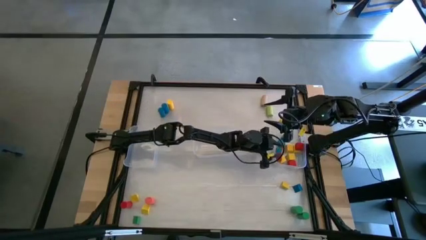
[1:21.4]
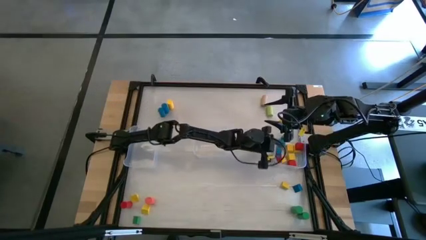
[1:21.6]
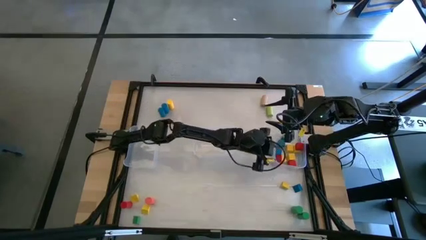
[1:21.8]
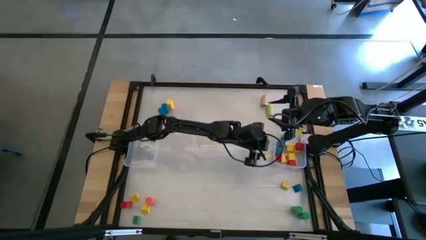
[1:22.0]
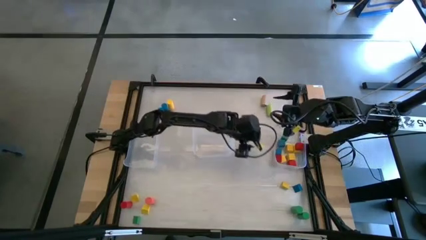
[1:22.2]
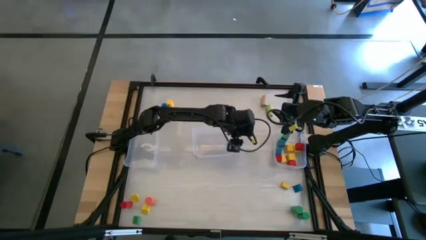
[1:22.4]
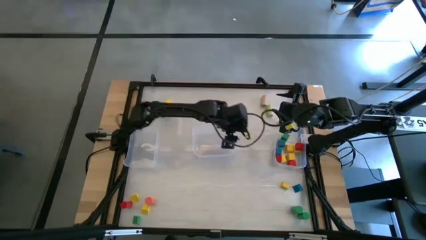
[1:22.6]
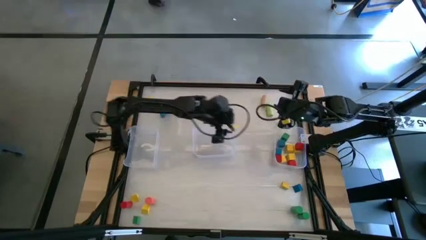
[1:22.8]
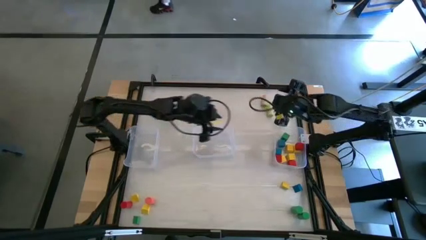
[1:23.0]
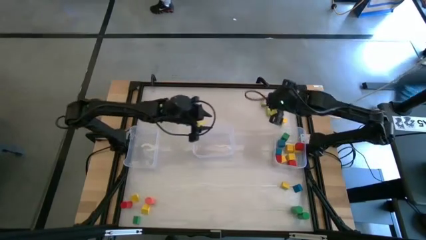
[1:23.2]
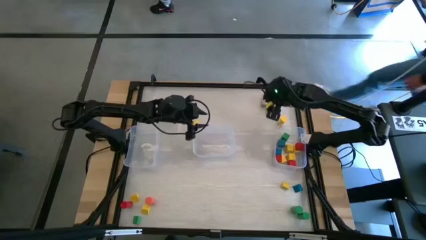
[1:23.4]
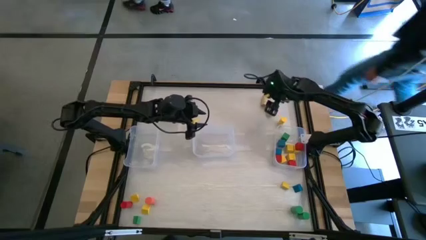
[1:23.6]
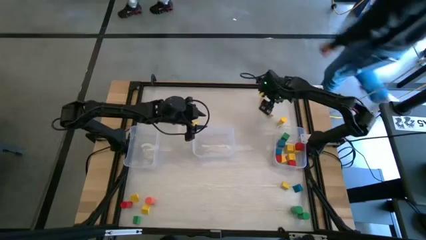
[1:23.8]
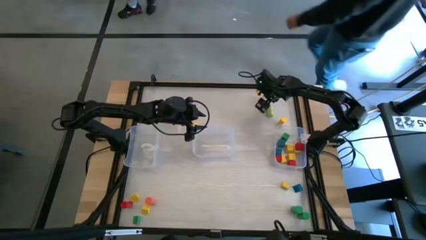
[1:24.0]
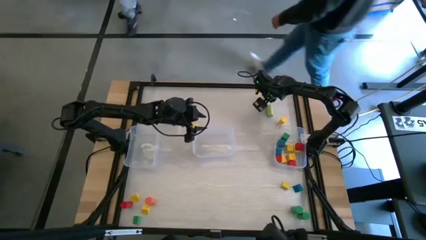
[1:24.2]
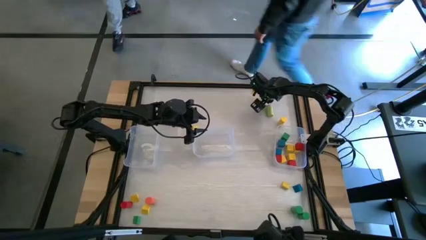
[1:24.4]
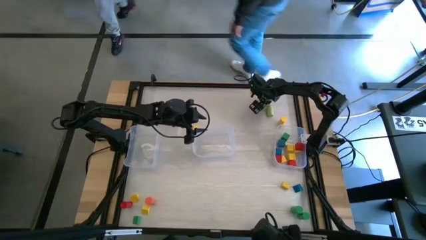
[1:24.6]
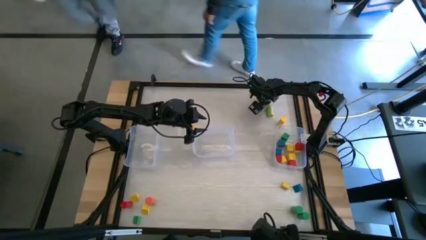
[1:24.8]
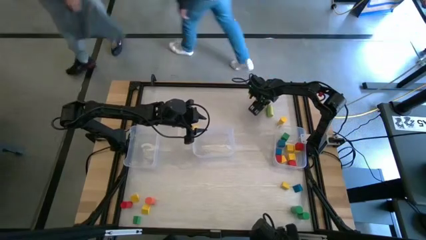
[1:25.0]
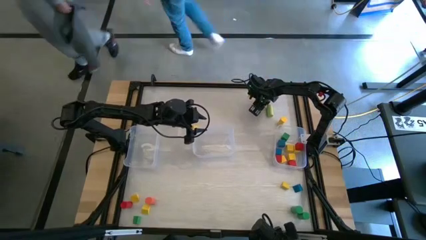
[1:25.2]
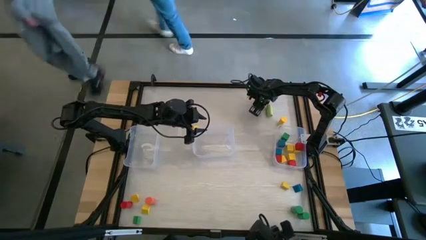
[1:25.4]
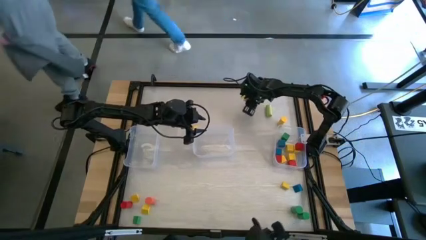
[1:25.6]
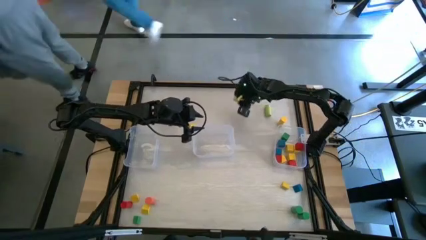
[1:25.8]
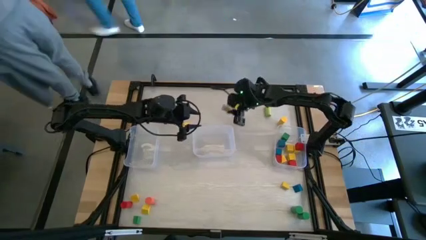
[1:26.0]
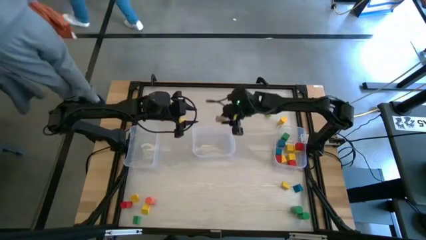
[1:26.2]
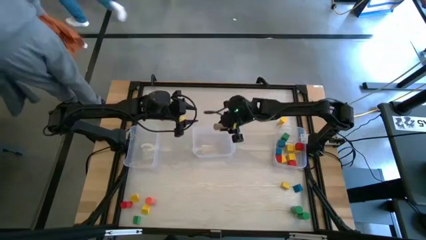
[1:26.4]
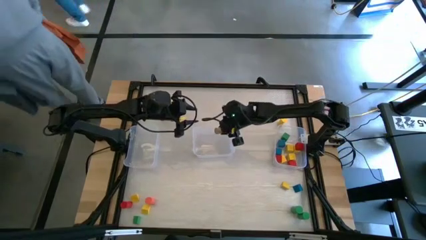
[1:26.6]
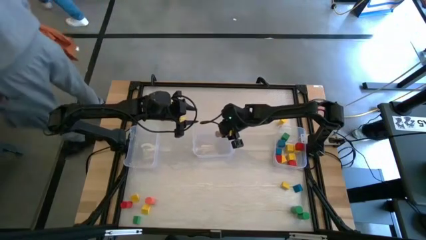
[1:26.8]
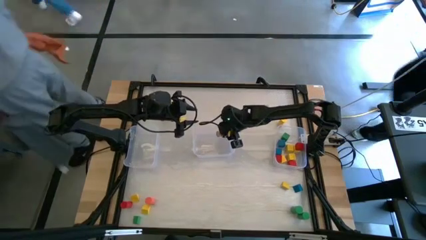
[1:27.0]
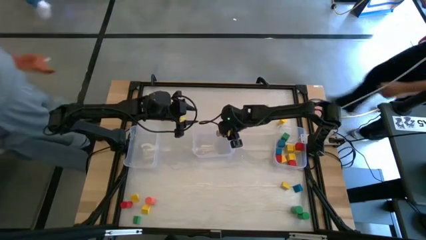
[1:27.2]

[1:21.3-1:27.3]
Task: Sort blocks by size
Put the light brown cylinder block into the center transparent bin

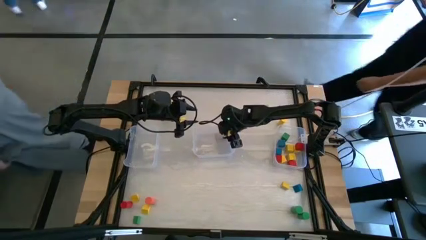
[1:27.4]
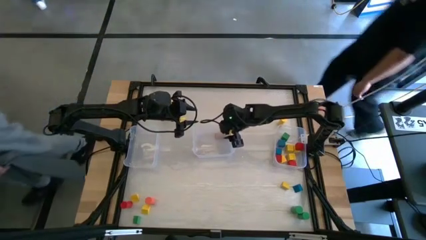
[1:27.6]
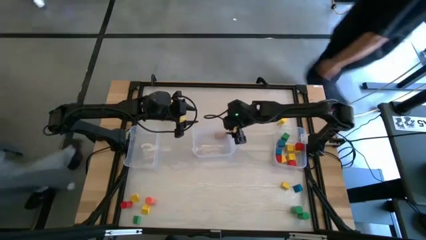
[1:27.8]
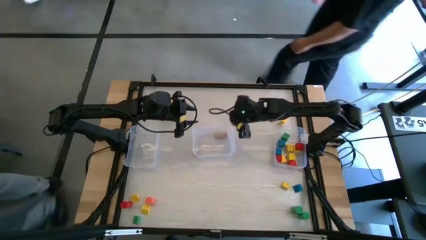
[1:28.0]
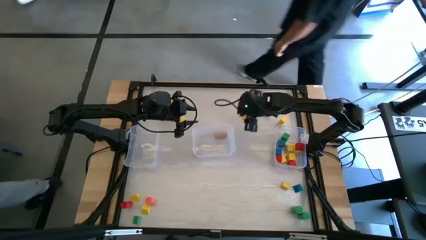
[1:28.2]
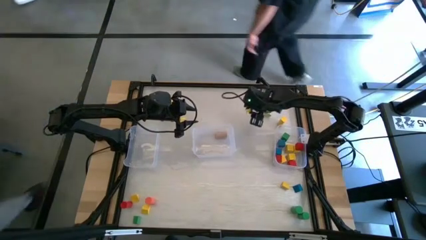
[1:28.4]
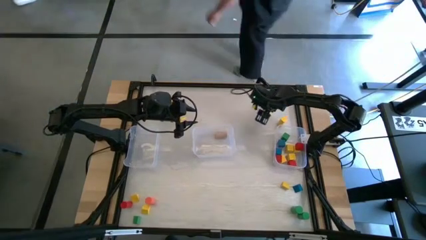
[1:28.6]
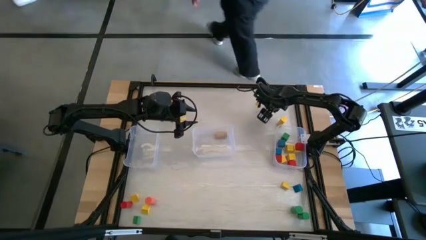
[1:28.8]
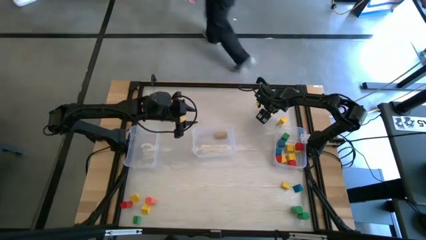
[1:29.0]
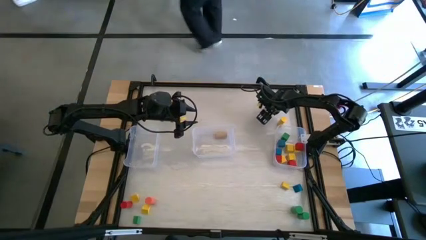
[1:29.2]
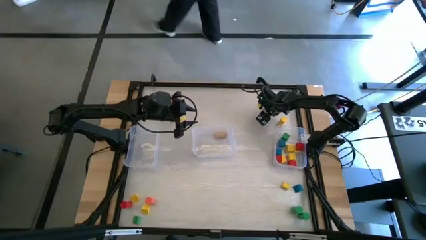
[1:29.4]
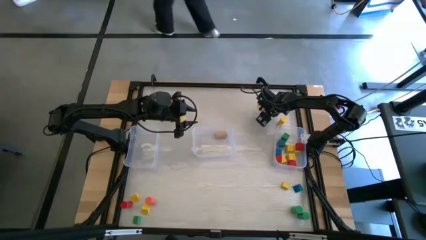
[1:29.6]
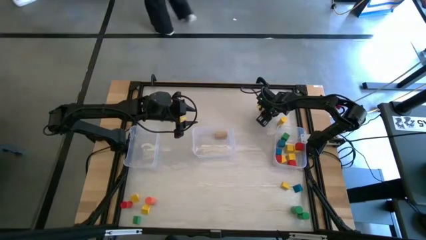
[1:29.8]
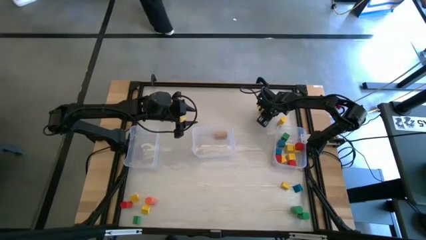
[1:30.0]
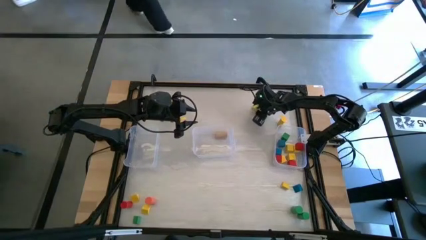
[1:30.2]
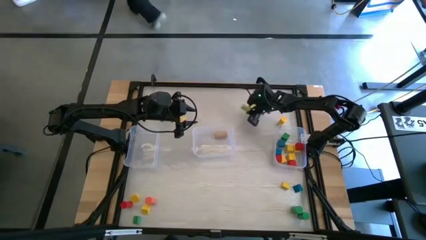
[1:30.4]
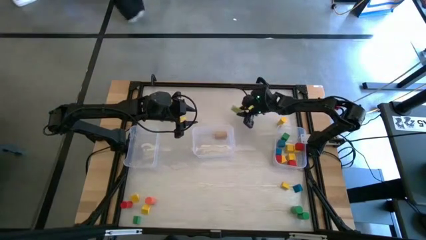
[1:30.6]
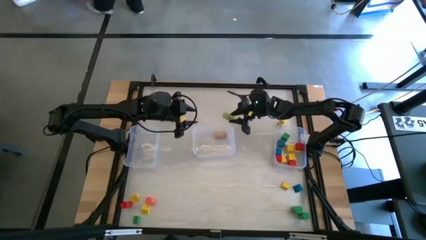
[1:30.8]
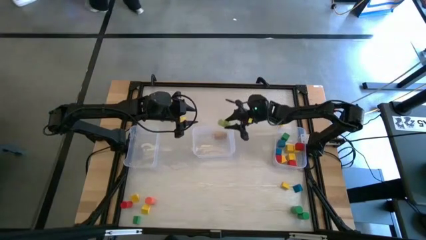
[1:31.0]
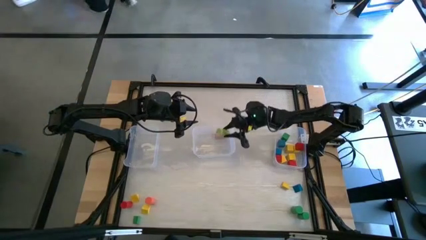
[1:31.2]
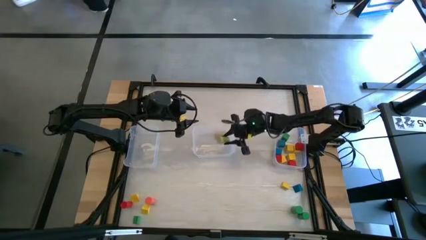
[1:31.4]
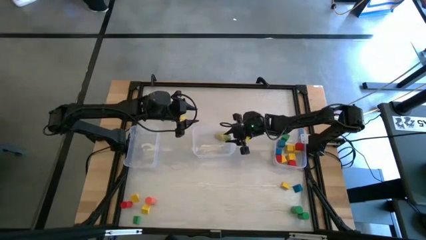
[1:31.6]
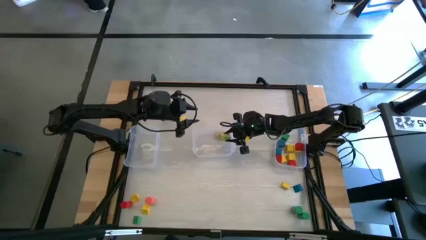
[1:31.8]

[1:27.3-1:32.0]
Put the light green cylinder block into the center transparent bin

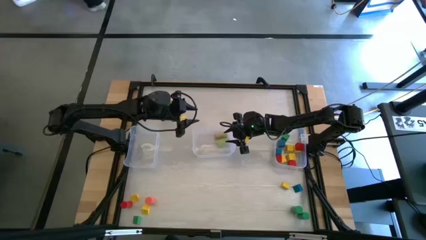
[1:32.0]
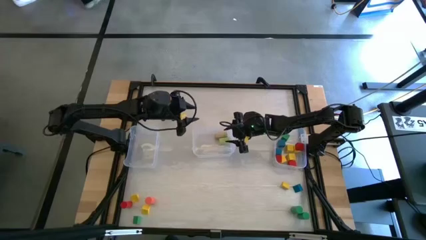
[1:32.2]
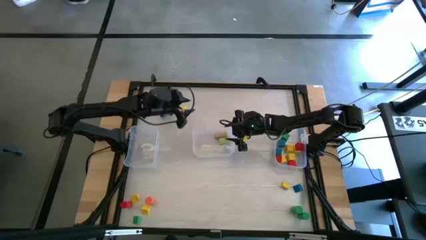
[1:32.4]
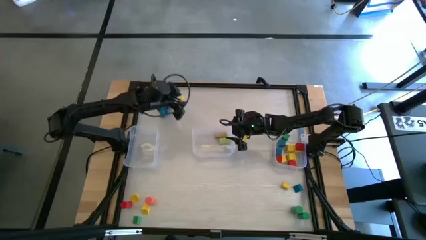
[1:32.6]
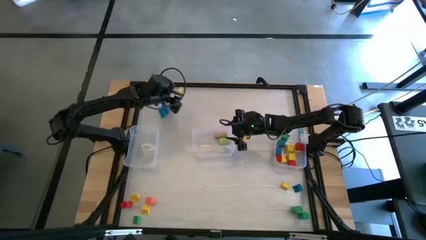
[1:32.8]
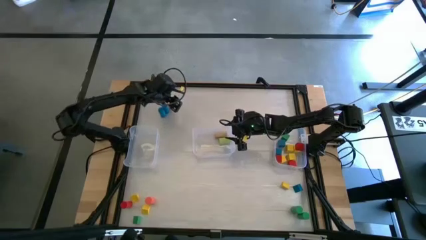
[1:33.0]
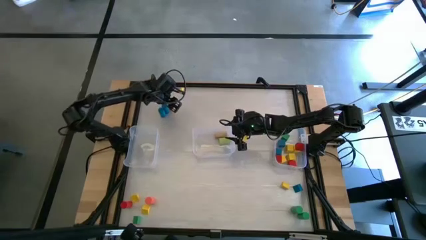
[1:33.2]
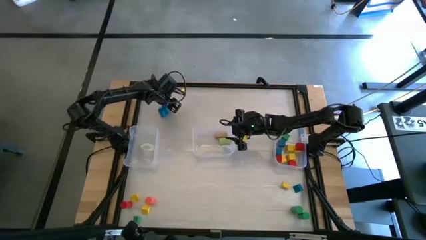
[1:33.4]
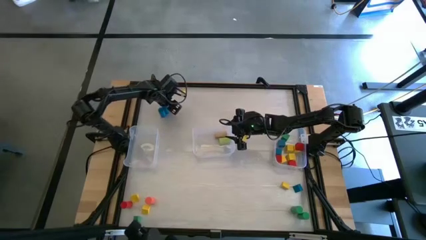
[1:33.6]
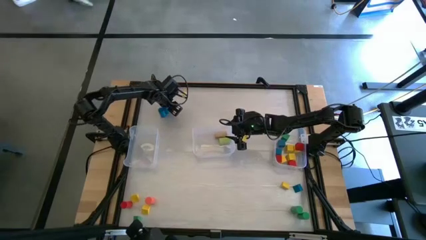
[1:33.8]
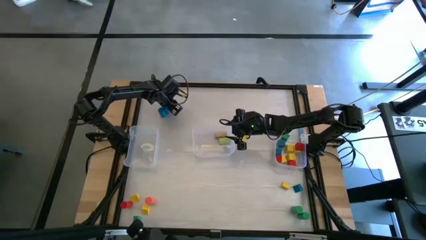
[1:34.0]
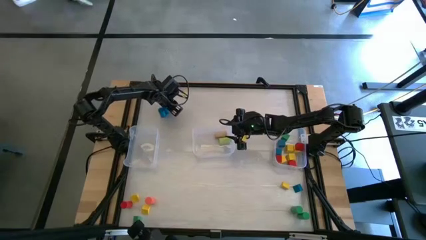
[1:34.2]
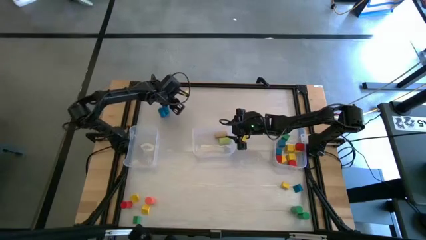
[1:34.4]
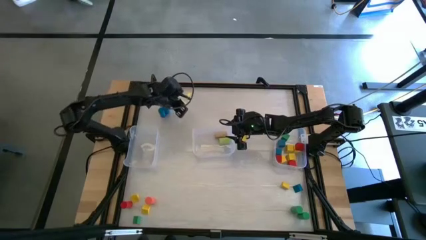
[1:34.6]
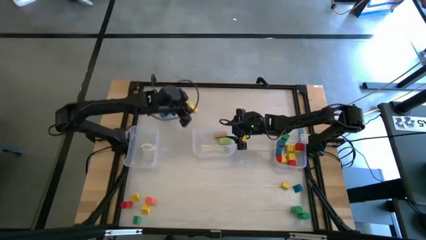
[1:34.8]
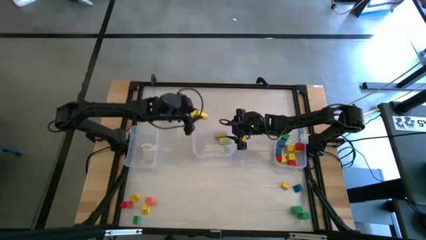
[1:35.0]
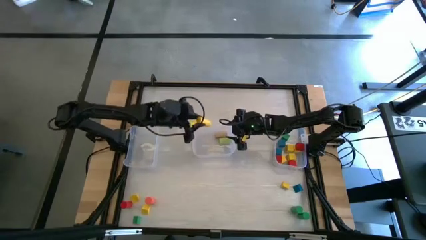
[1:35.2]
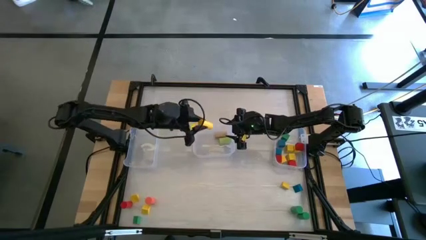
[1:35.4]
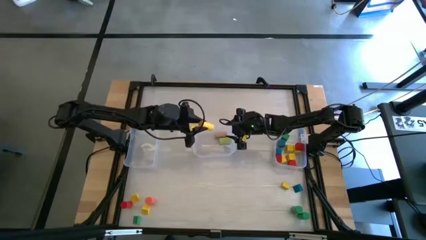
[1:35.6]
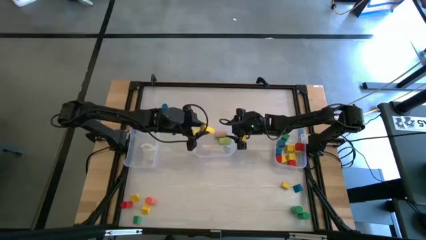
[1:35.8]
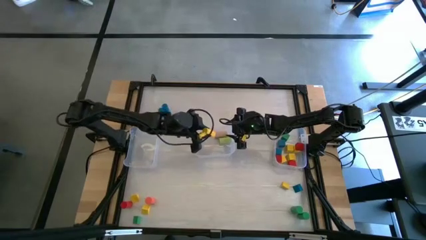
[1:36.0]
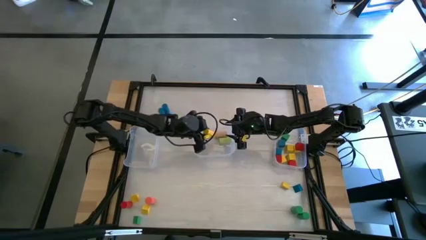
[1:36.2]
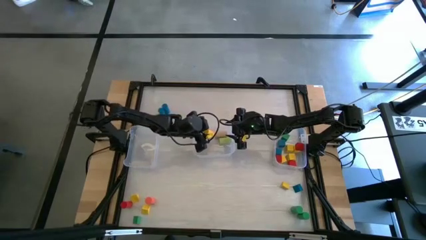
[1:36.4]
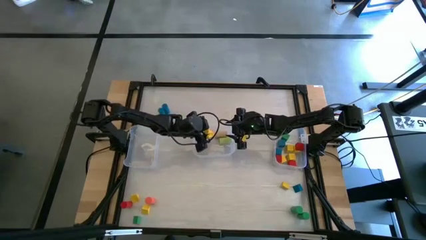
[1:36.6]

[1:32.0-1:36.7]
Put the yellow cylinder block into the center transparent bin

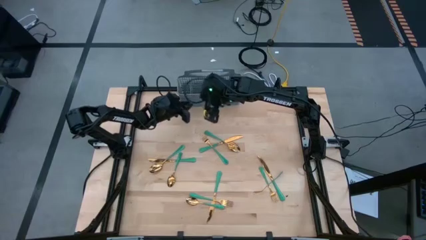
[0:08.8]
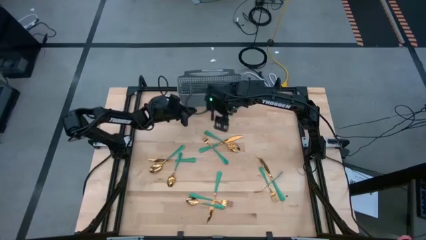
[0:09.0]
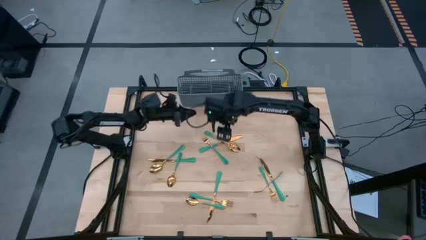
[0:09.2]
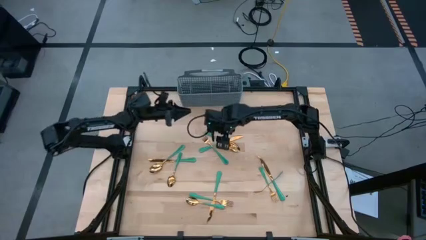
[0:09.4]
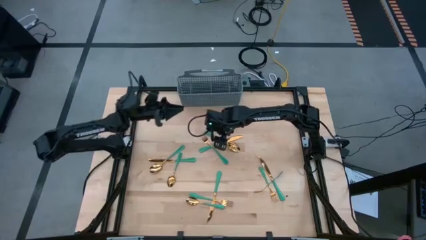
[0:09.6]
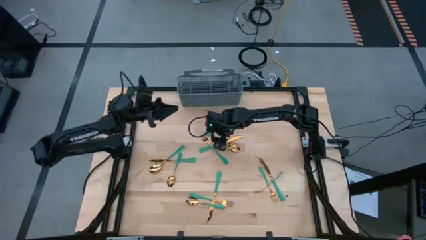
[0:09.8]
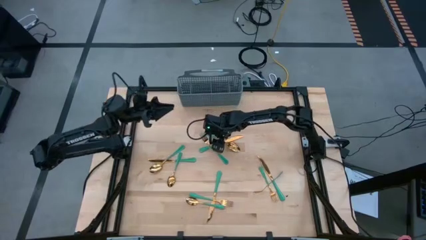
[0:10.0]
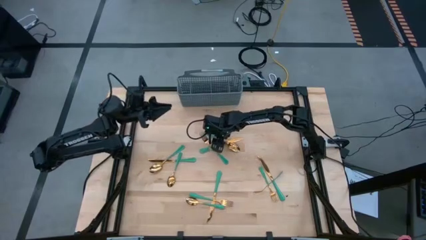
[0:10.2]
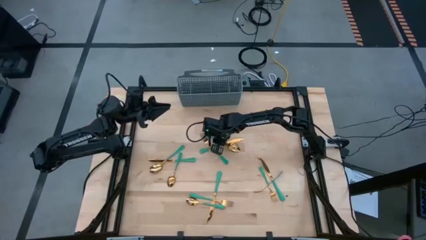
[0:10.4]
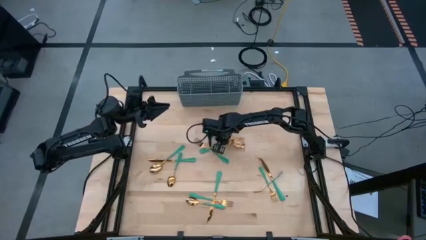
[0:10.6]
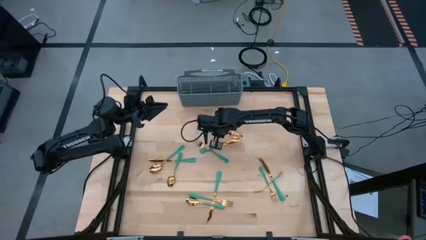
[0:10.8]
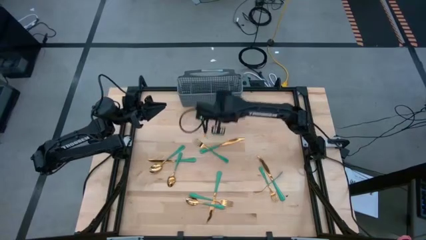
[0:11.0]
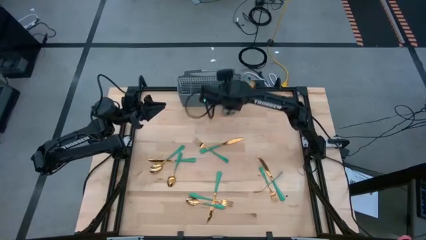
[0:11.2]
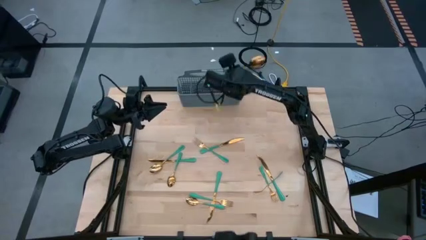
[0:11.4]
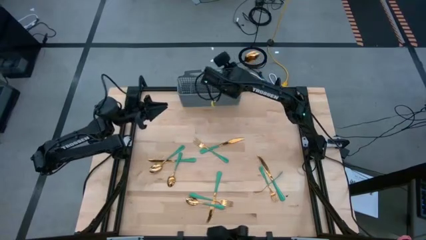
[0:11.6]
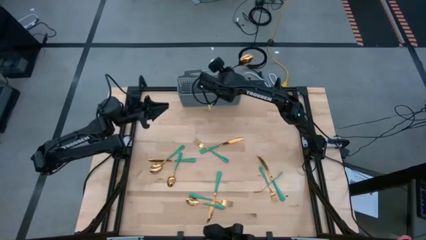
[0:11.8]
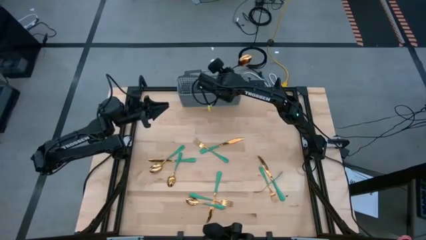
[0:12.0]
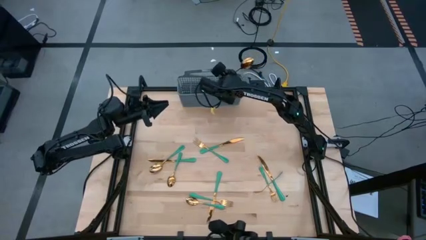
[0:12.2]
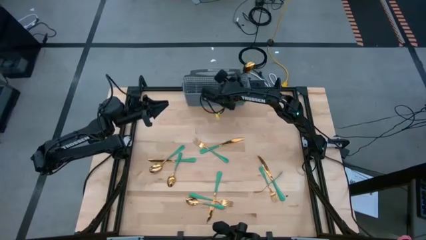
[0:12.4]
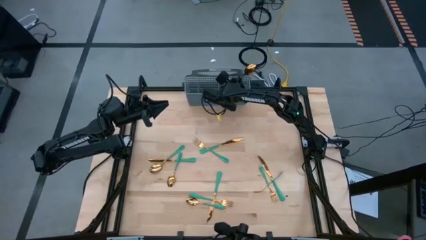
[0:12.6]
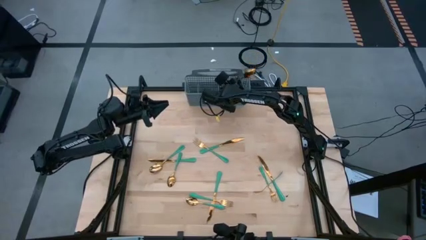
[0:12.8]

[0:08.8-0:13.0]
Task: Sort silverware
Put the green spoon into the gray silverware organizer
